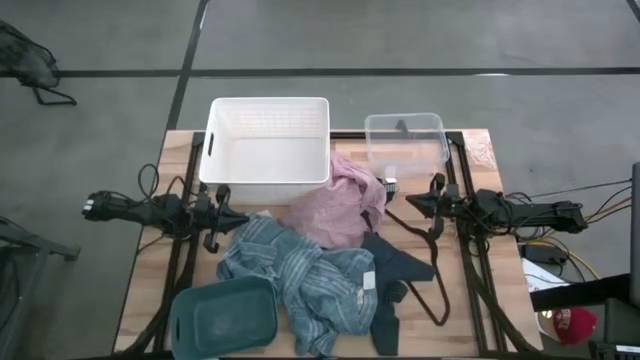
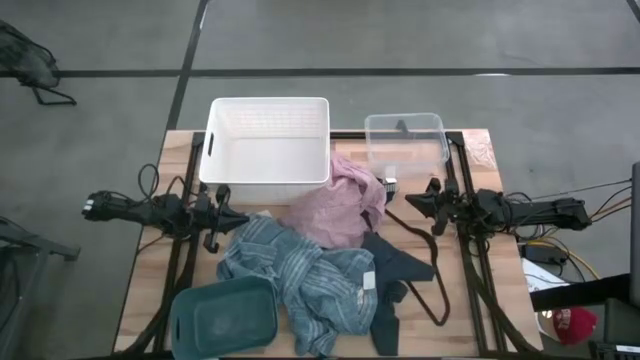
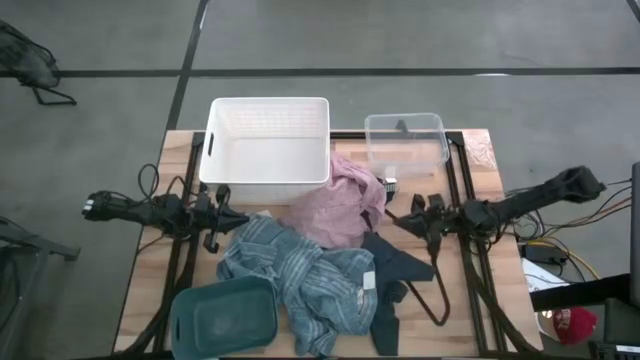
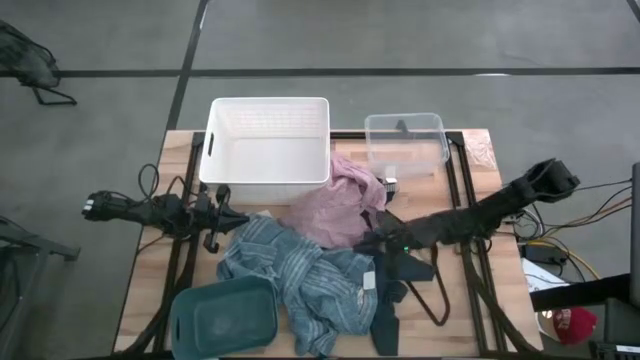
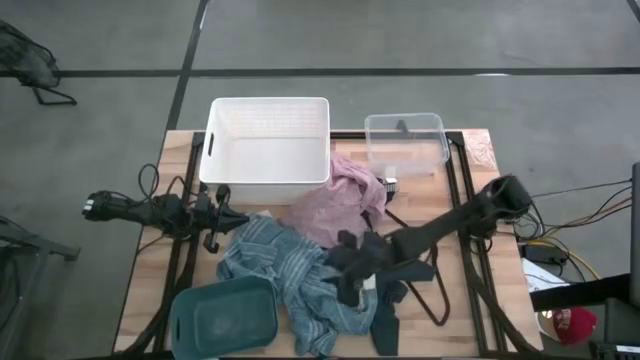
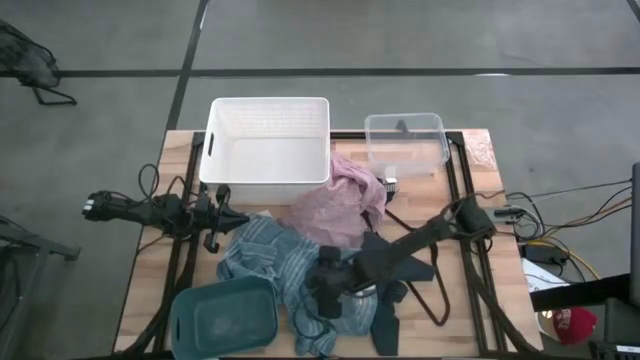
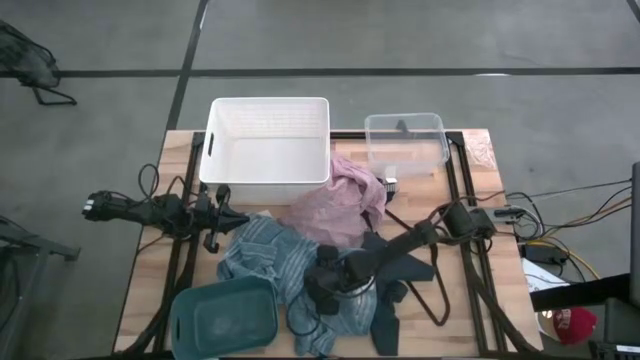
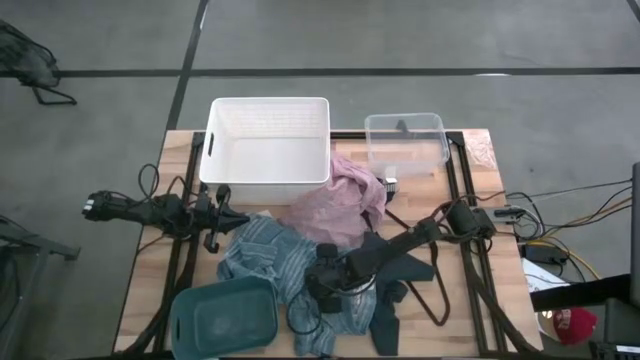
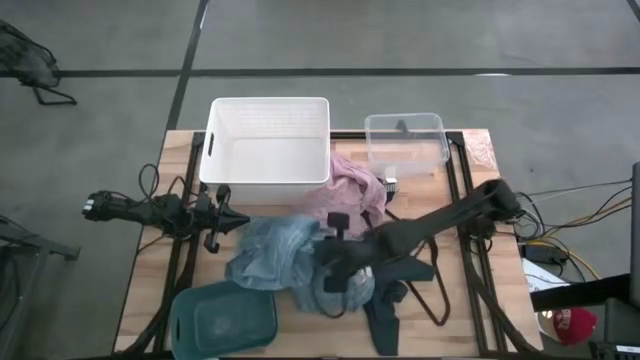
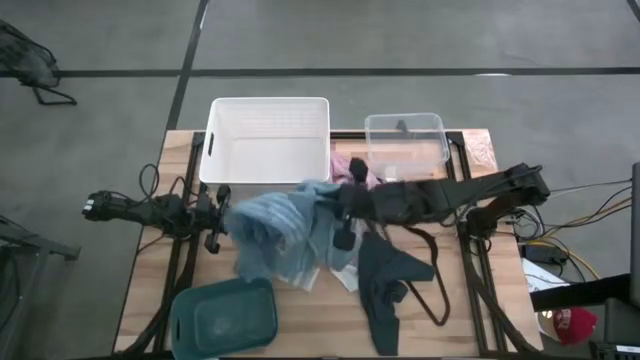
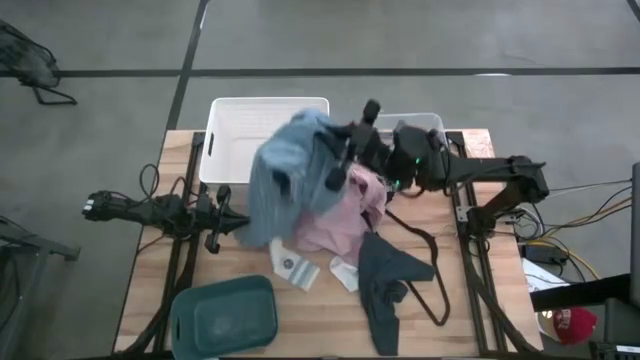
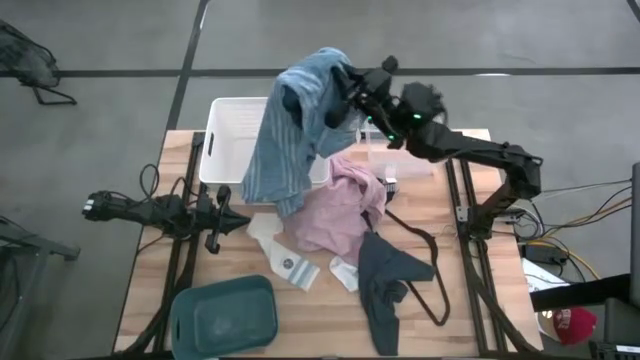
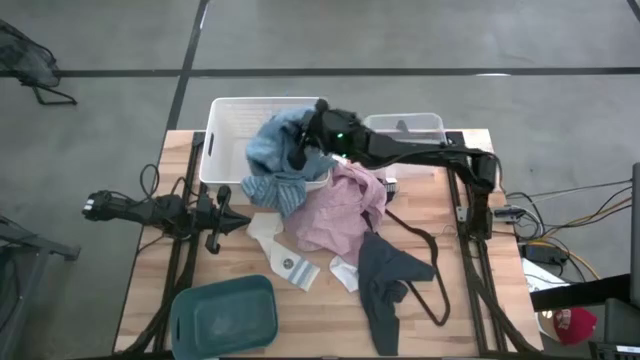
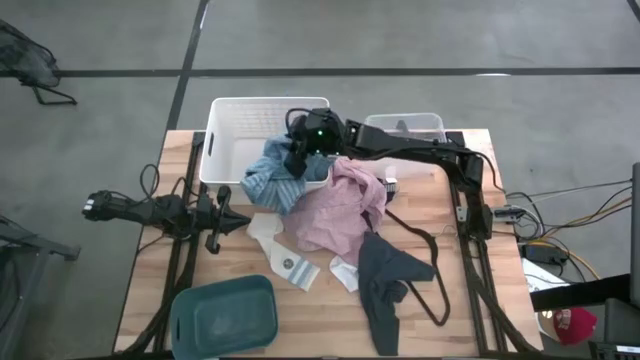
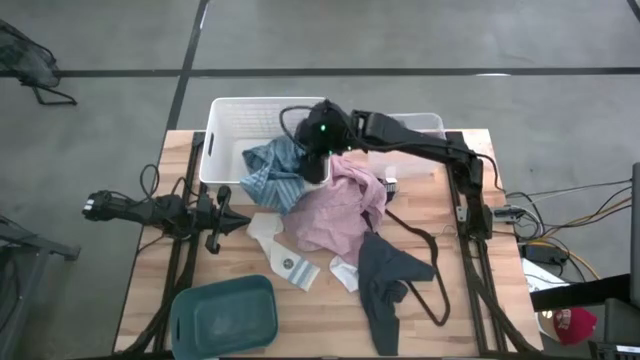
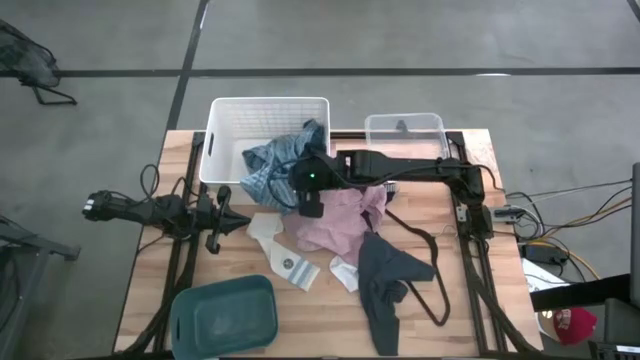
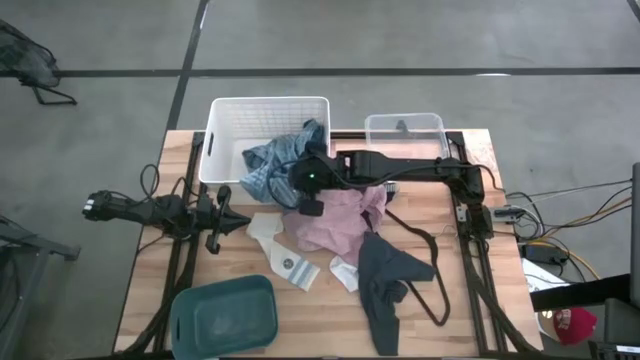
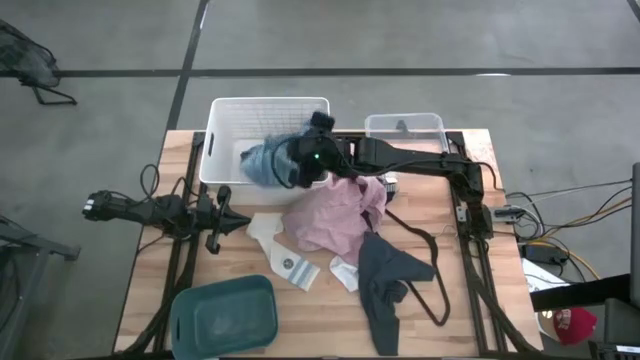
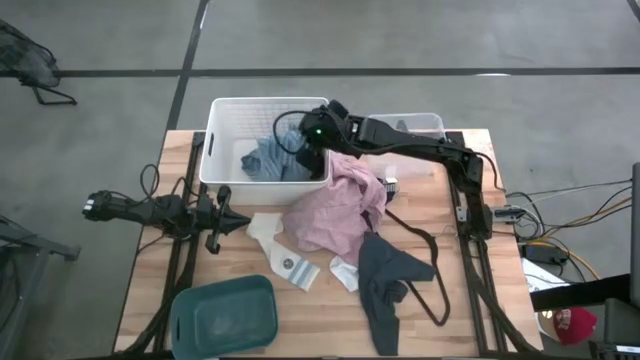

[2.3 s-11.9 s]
Task: Pick & Place Cloths
Put the blue long sleeve in the white bin

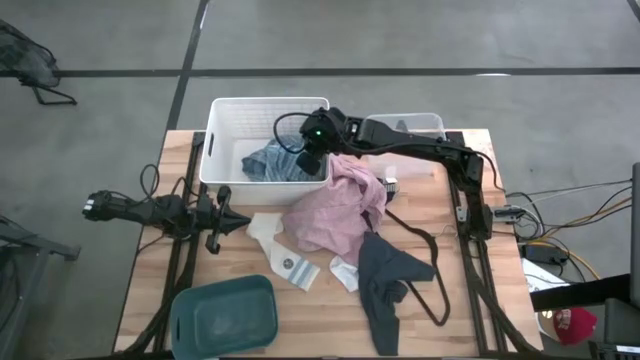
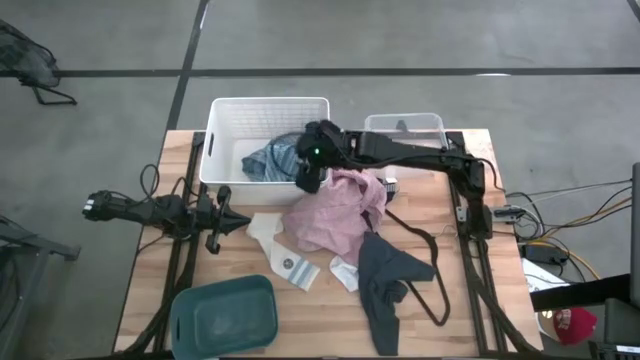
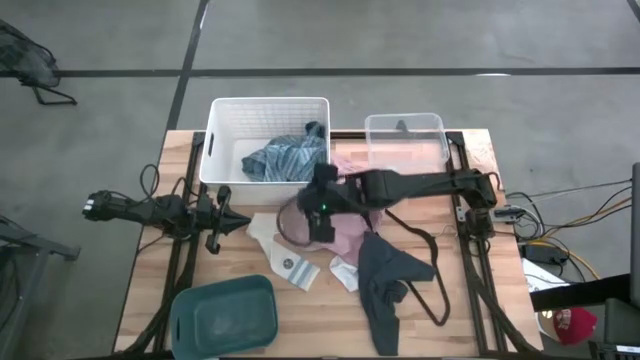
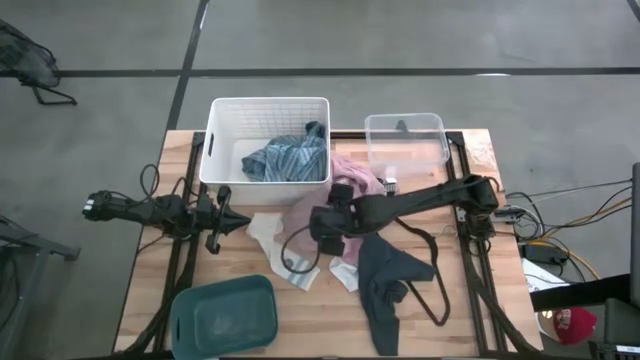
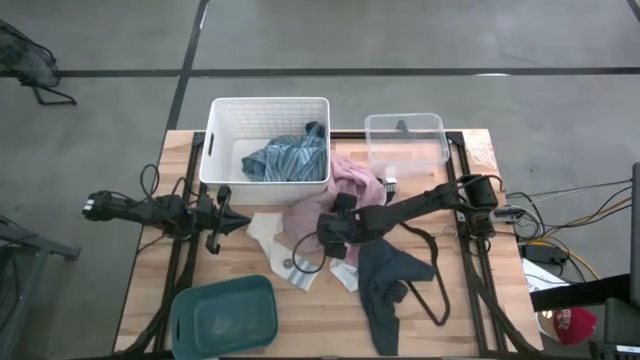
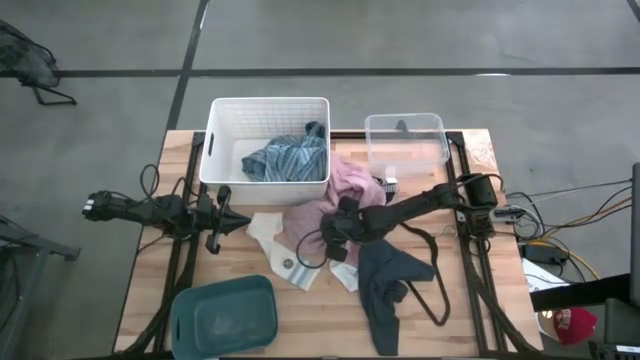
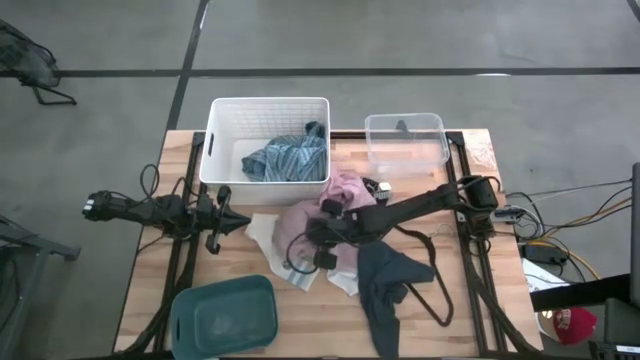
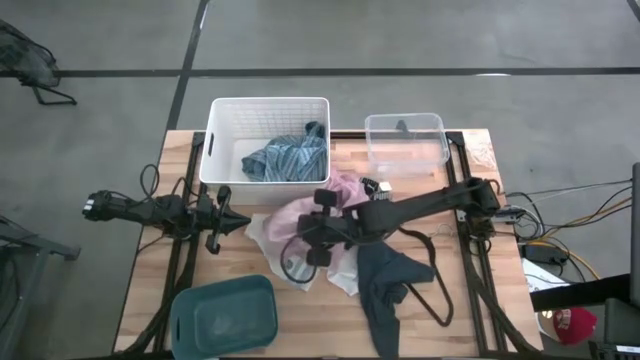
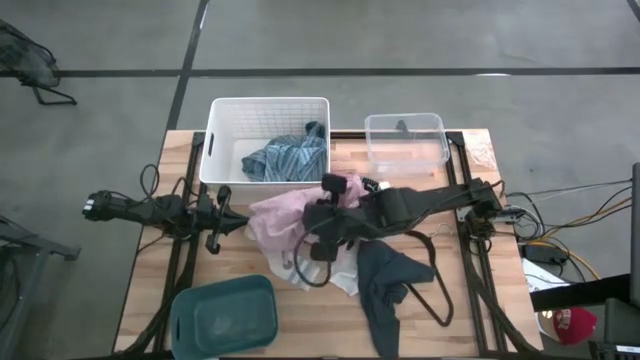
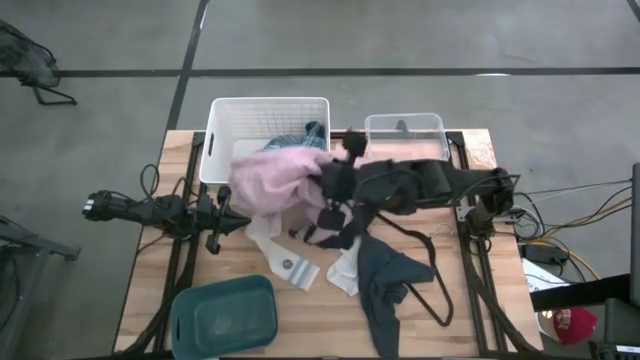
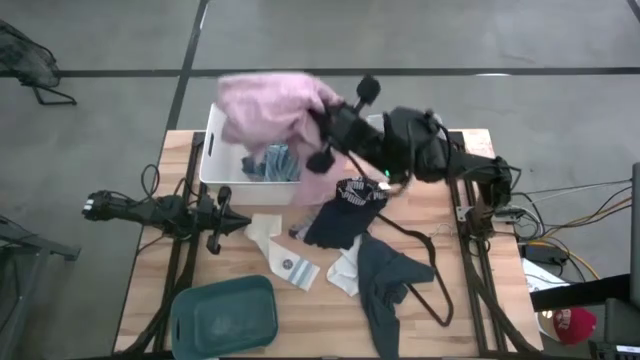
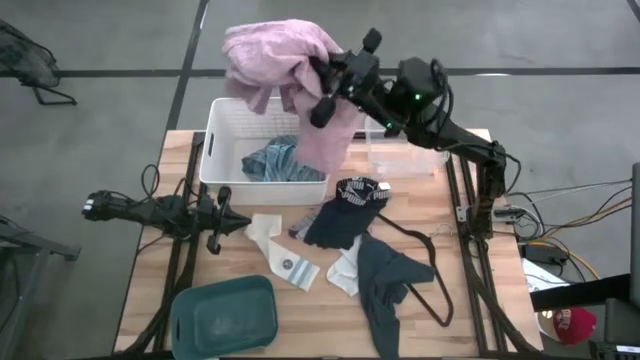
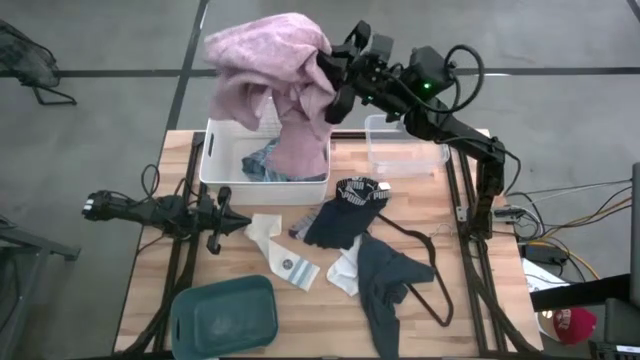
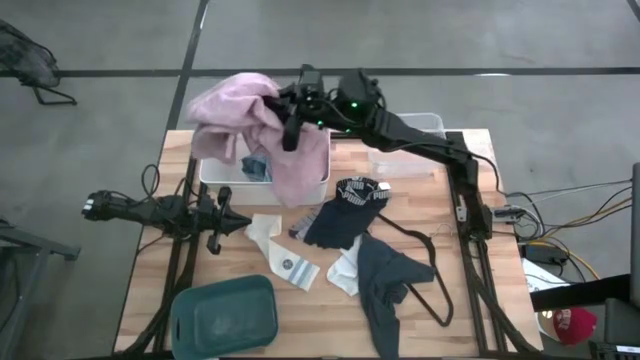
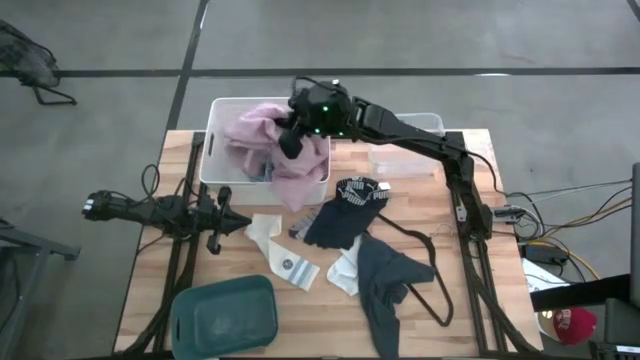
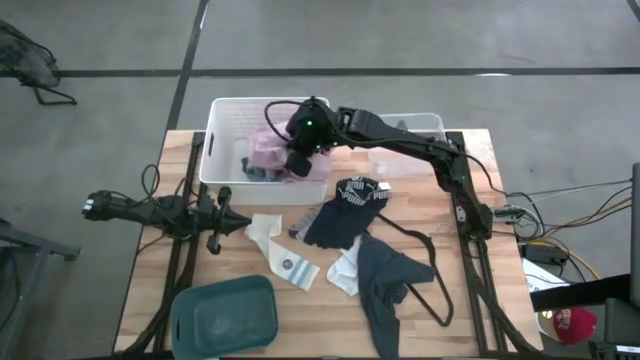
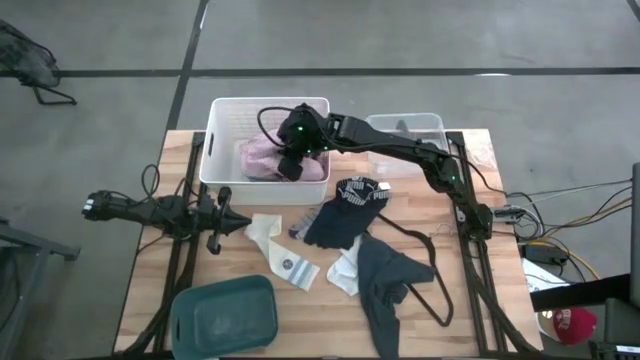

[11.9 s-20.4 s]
Put the pink long sleeve in the white bin

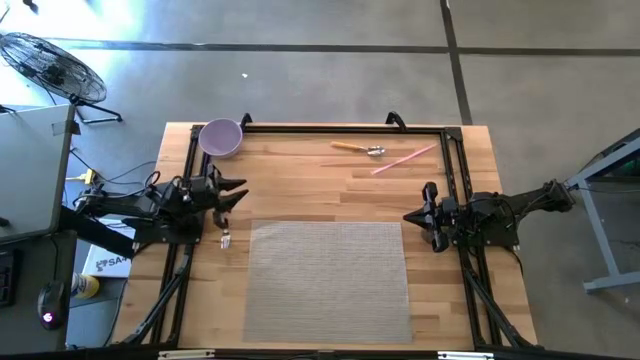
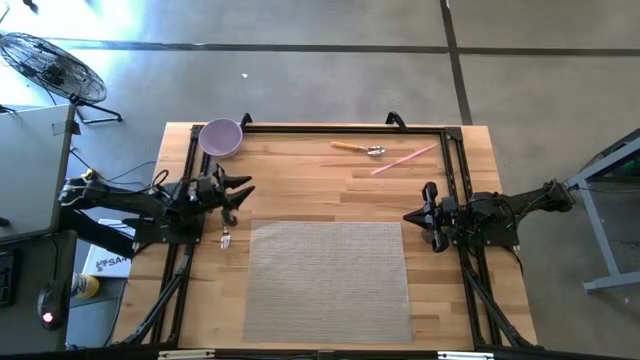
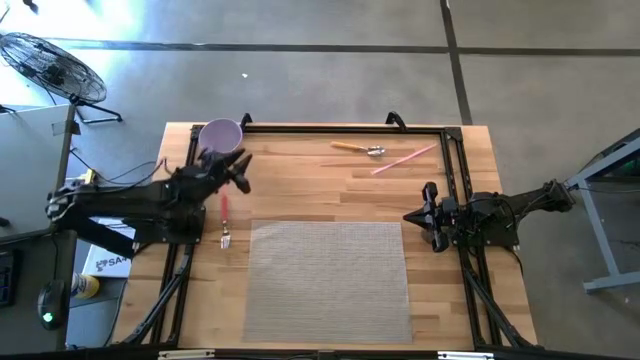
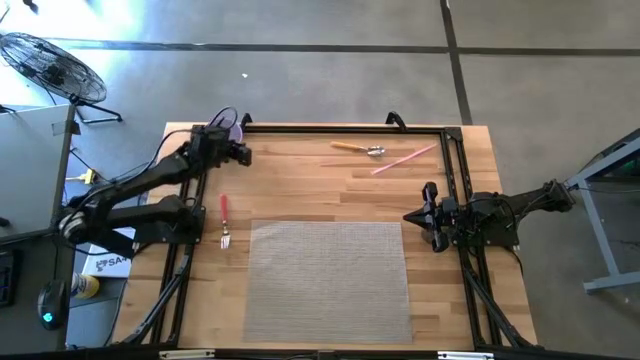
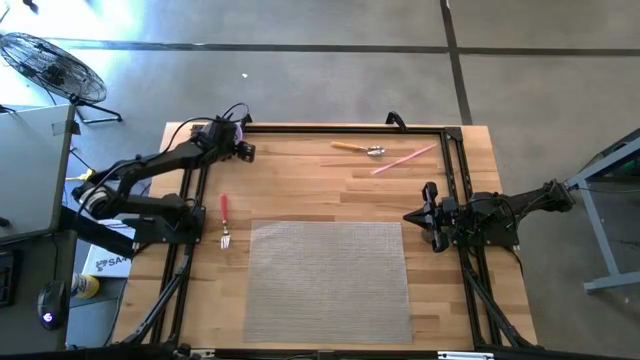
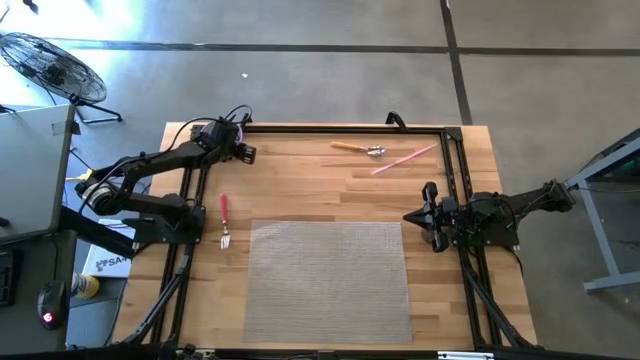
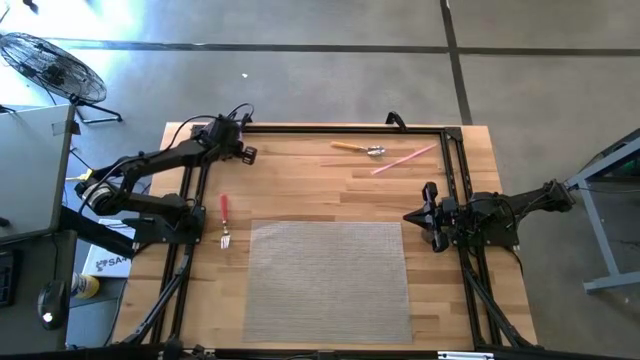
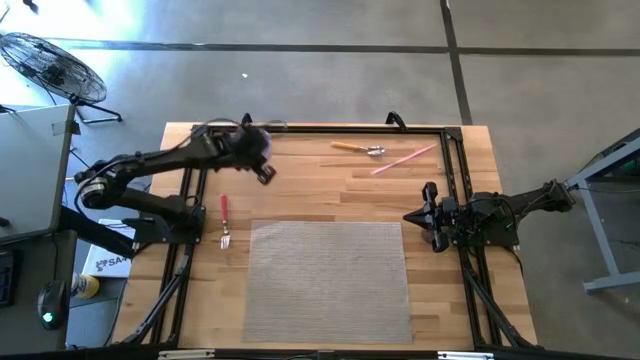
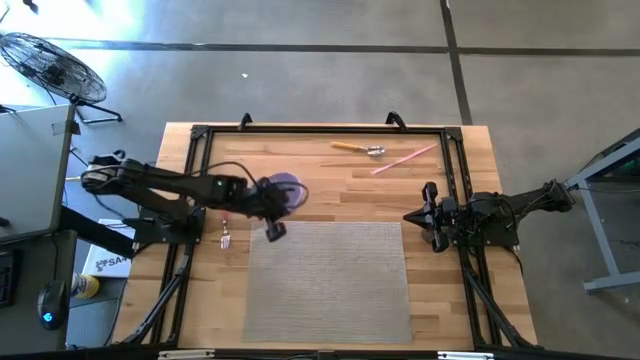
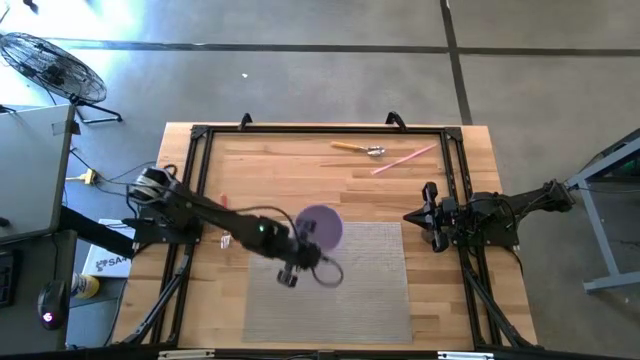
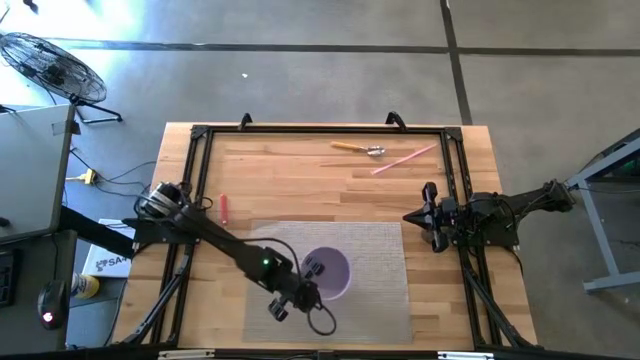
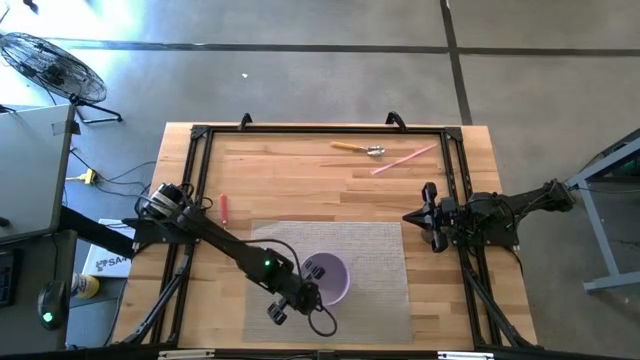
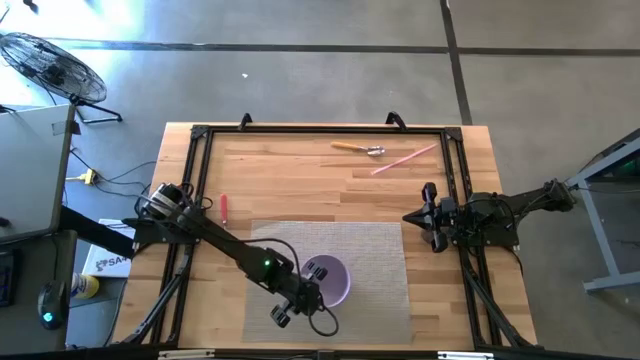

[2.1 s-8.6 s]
Task: Pick & Place Utensil
Put the purple bowl on the gray mat
